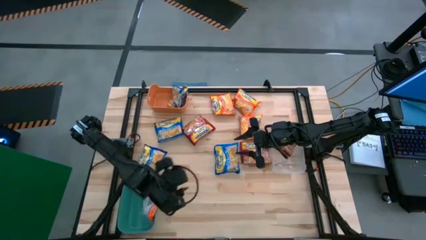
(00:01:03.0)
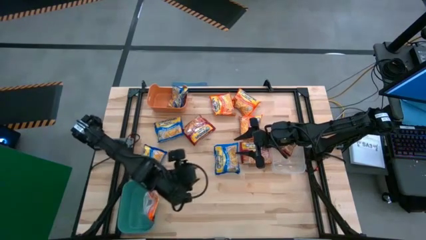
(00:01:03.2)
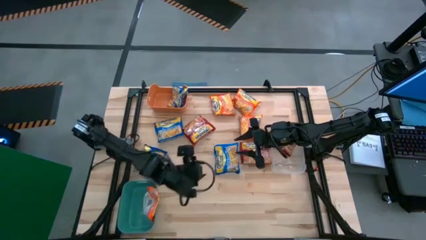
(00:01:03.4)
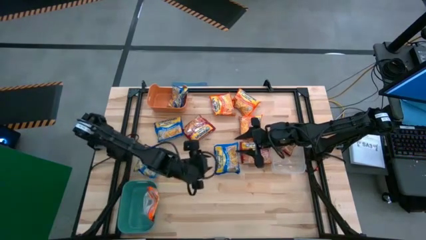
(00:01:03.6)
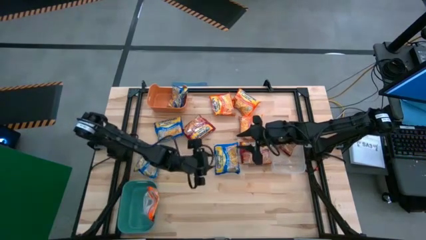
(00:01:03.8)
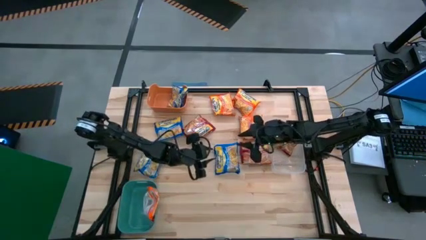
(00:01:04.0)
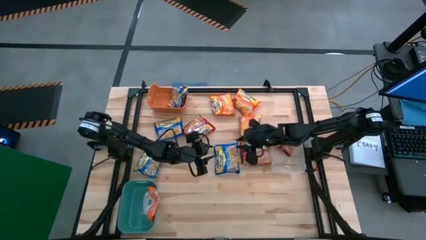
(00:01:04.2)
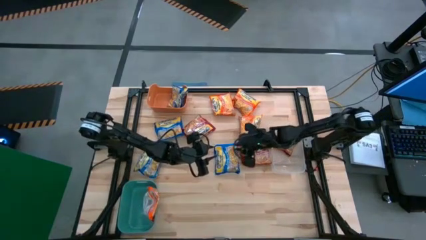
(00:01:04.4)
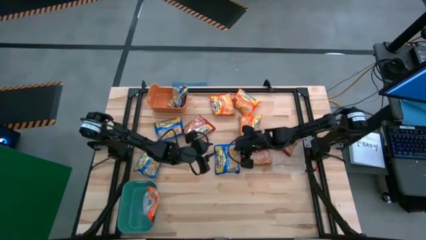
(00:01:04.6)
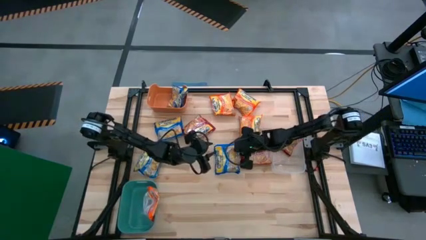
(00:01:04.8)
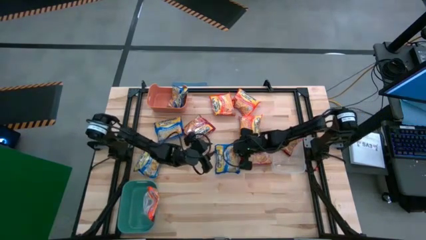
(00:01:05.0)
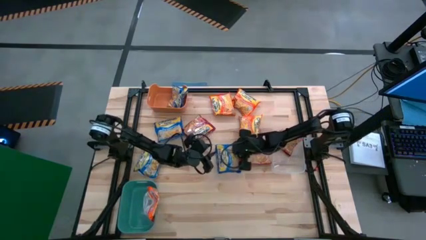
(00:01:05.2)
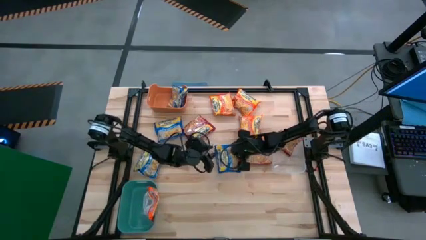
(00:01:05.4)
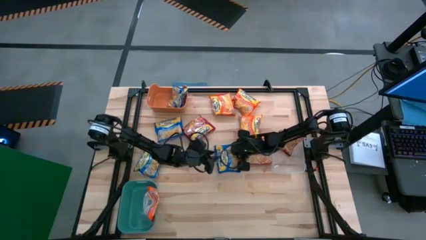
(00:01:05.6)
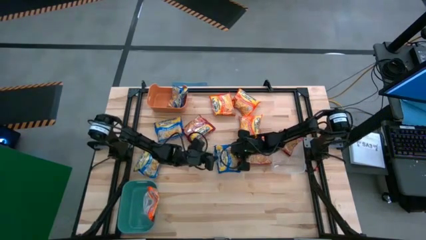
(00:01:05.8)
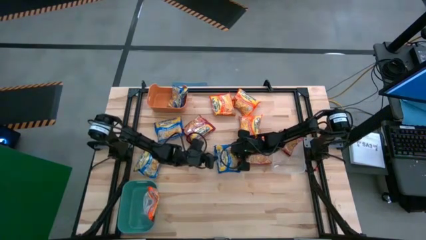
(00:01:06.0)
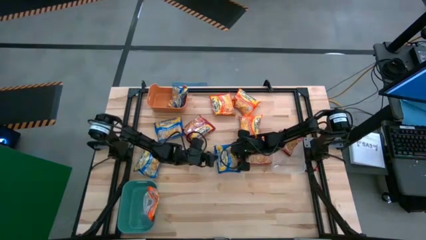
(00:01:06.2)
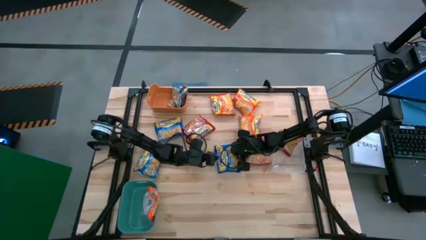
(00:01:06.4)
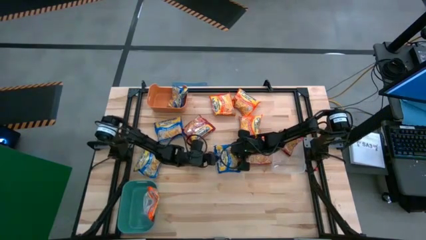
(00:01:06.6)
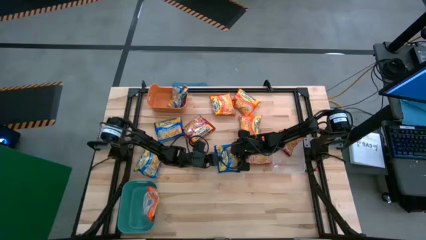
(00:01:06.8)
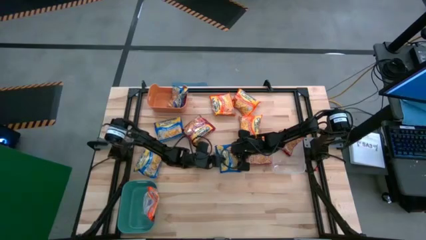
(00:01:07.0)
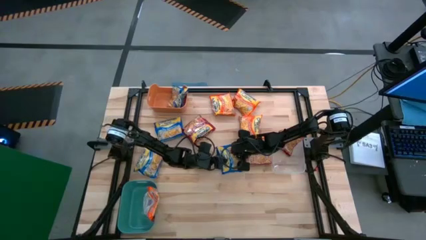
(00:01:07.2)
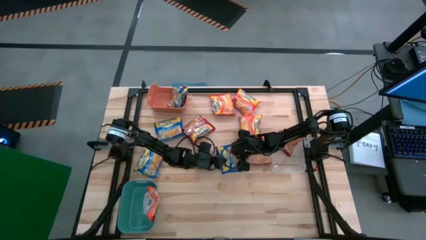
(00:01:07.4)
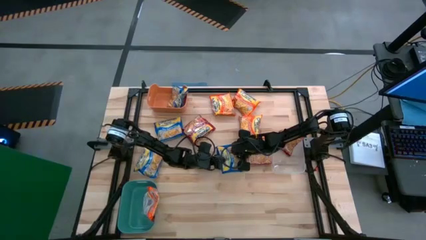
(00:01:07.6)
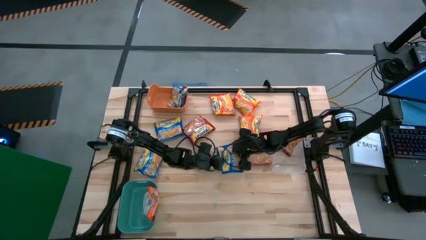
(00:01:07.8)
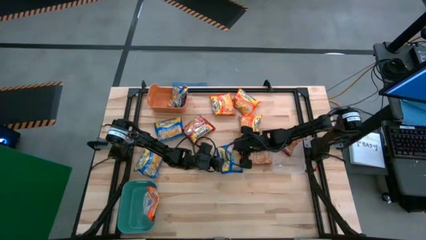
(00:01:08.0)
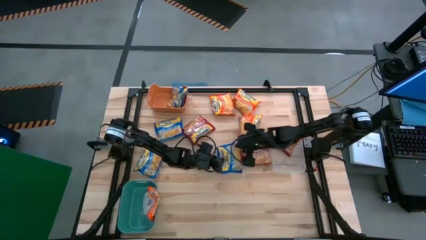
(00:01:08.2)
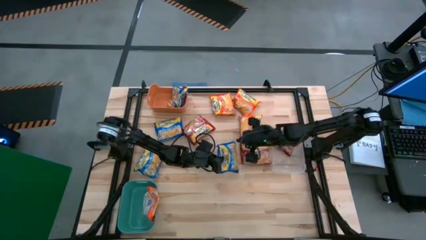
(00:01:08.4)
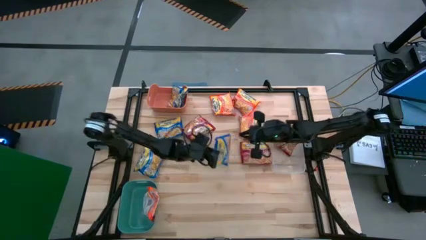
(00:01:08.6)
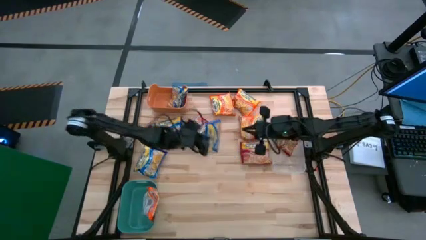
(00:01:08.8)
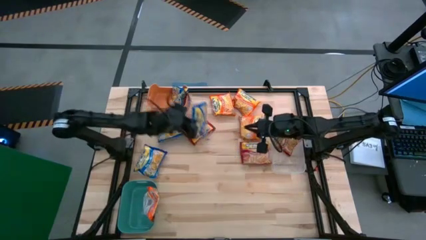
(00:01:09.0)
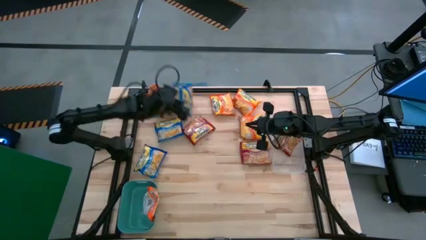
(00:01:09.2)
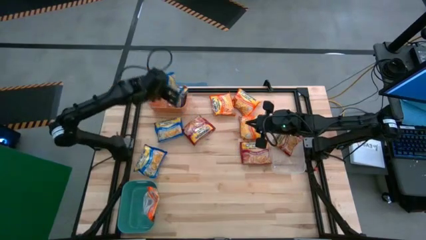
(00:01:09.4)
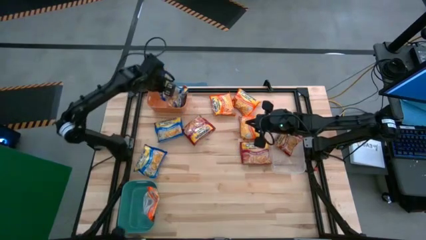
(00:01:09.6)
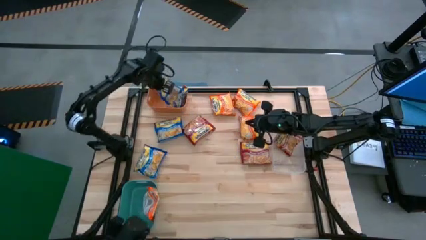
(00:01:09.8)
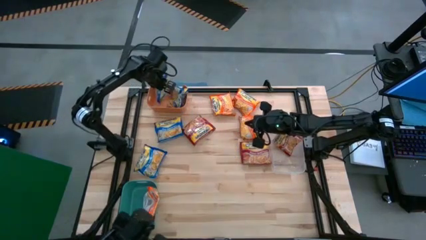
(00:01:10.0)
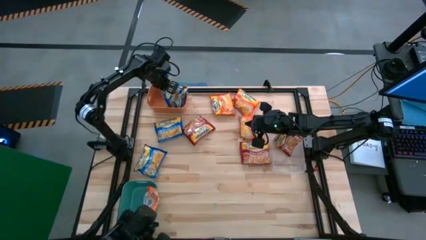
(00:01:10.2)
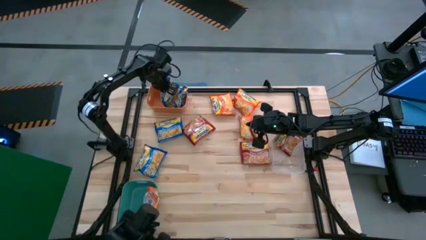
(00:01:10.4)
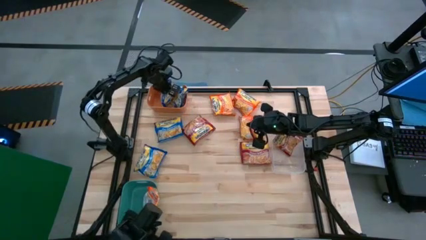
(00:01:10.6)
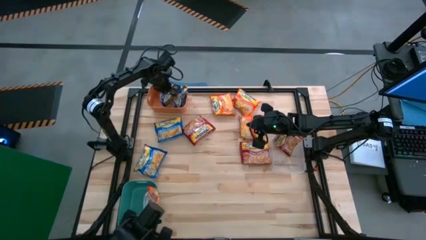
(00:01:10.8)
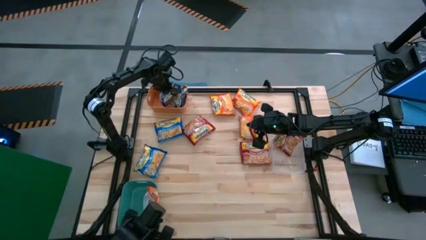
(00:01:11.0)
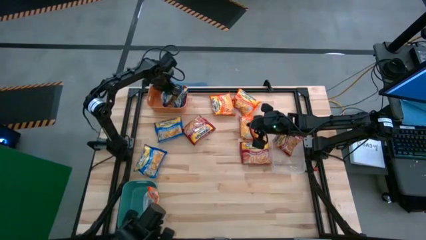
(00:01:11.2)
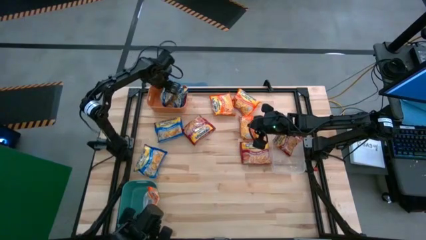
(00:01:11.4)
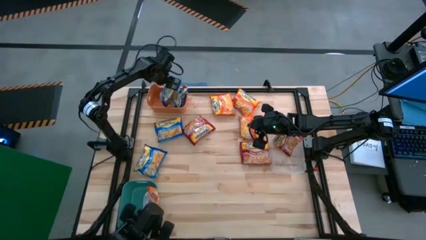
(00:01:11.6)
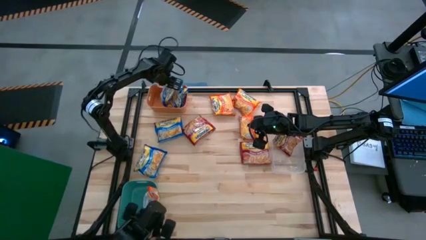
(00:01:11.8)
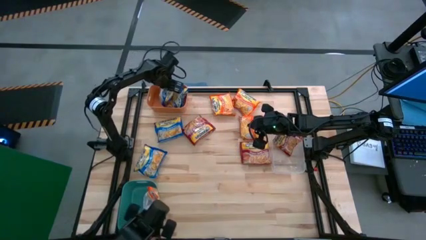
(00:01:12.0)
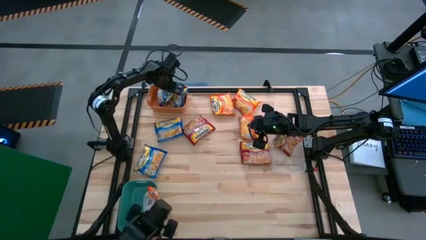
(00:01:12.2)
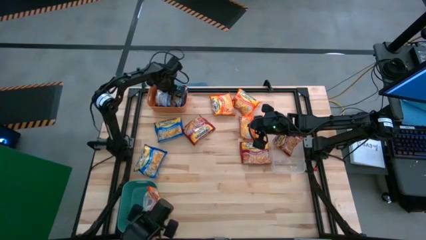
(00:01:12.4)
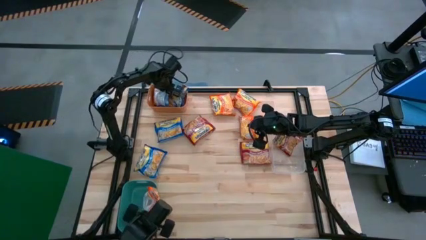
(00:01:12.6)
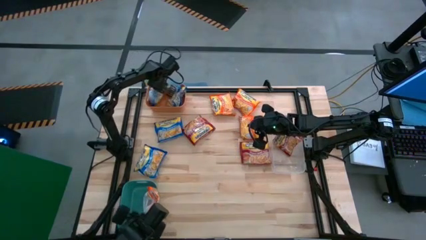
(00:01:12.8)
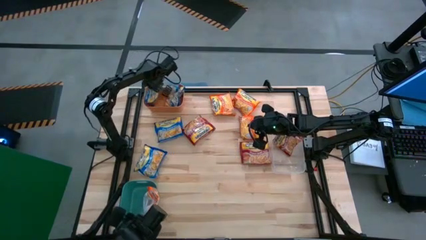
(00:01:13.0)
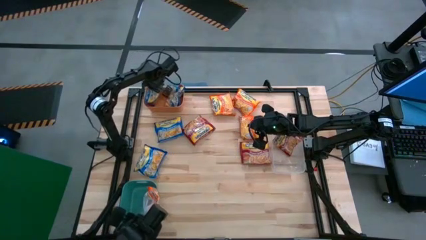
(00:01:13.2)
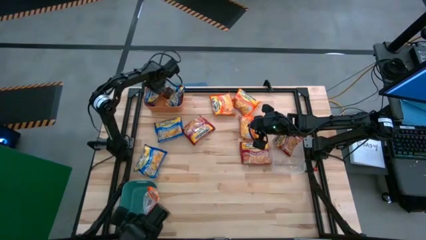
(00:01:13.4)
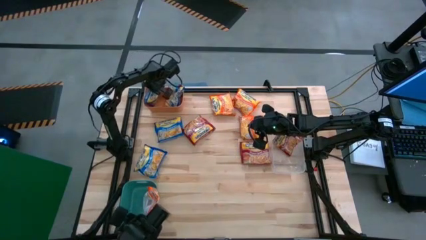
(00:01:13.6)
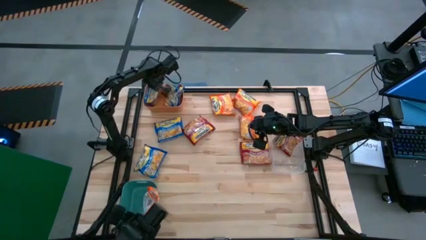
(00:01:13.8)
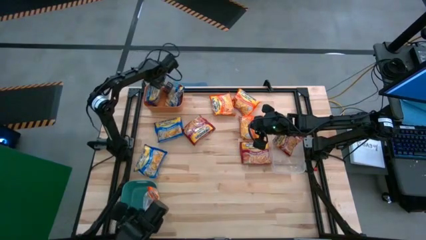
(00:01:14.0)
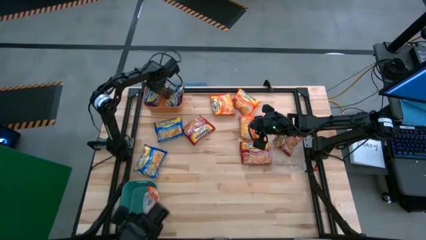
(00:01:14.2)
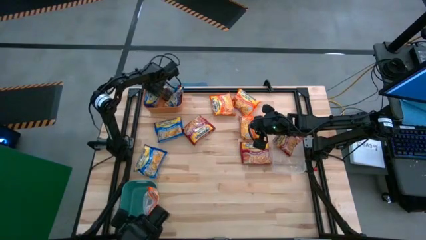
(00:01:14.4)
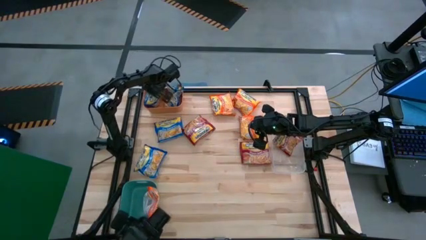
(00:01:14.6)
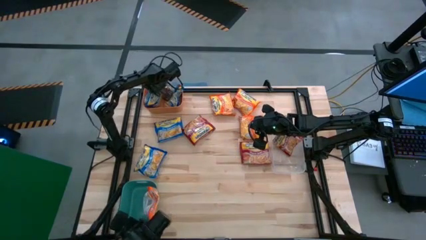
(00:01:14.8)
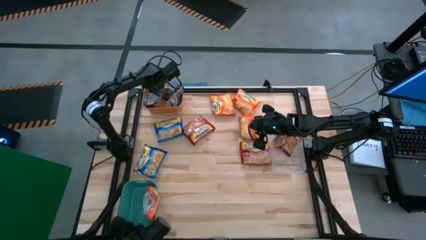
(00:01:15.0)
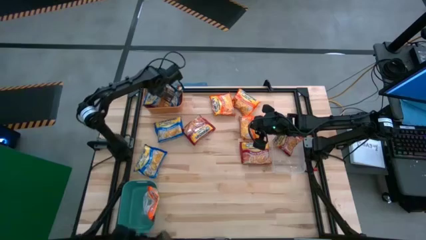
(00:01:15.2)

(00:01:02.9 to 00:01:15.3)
Task: Sort Maruchan noodles
Put the blue noodle pack into the orange bin

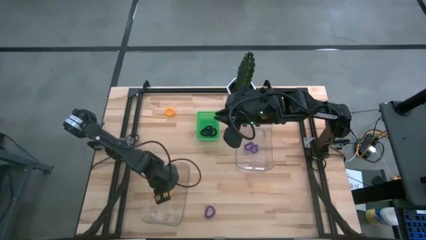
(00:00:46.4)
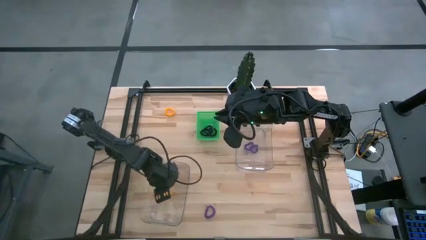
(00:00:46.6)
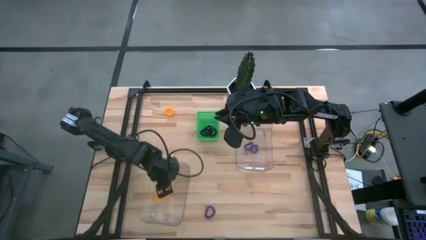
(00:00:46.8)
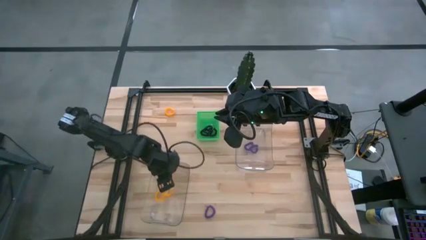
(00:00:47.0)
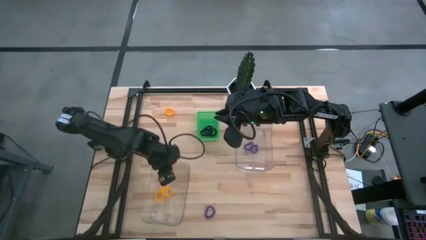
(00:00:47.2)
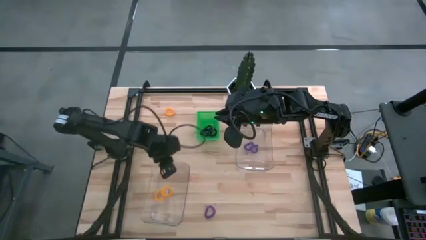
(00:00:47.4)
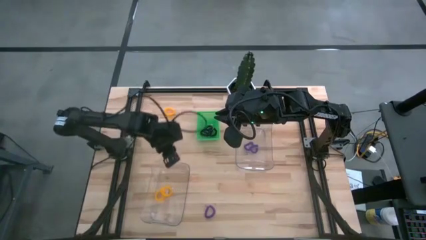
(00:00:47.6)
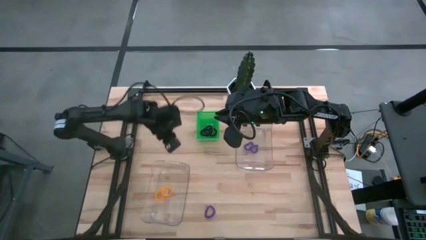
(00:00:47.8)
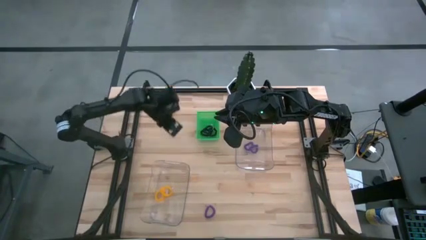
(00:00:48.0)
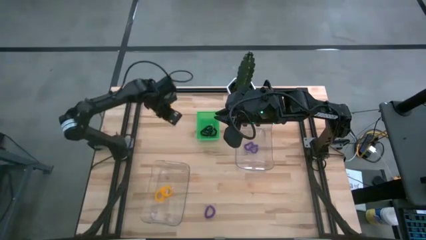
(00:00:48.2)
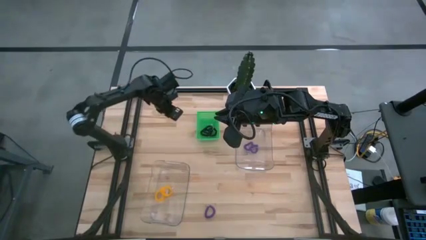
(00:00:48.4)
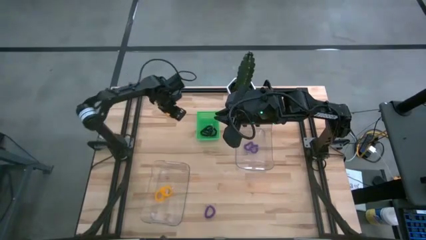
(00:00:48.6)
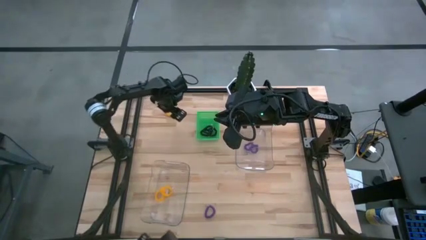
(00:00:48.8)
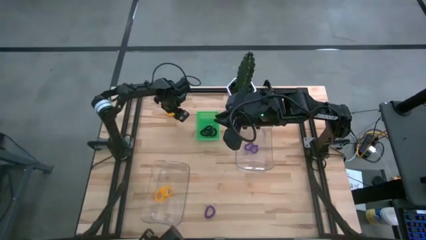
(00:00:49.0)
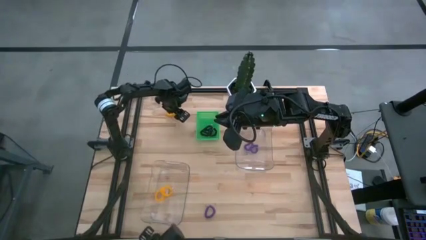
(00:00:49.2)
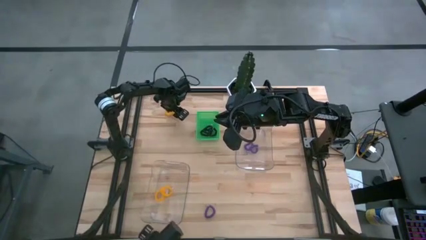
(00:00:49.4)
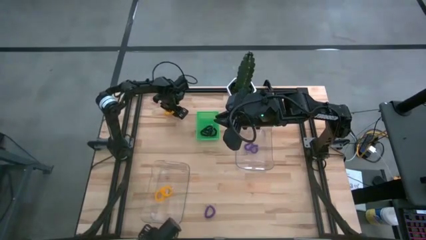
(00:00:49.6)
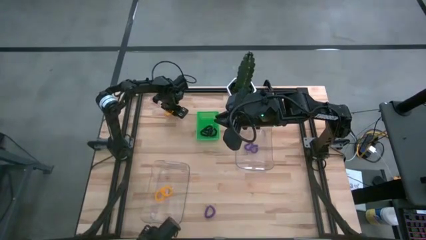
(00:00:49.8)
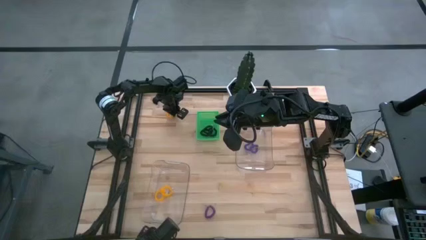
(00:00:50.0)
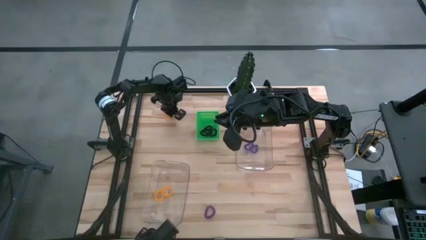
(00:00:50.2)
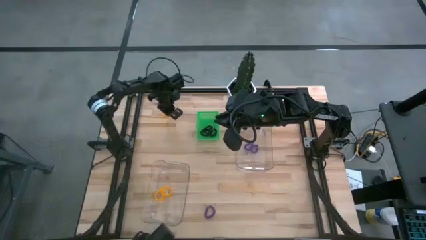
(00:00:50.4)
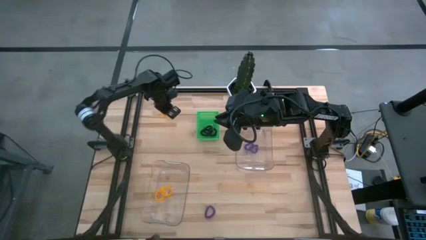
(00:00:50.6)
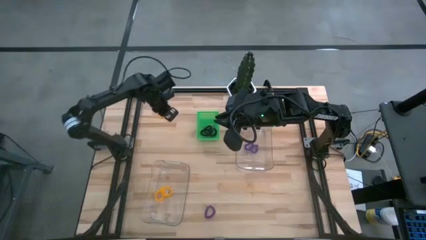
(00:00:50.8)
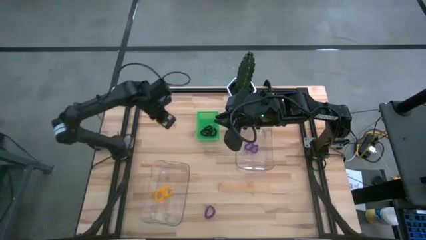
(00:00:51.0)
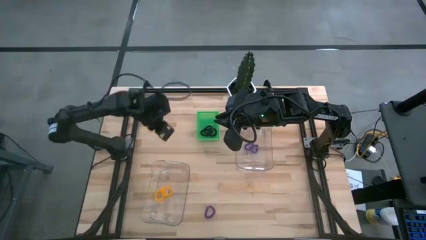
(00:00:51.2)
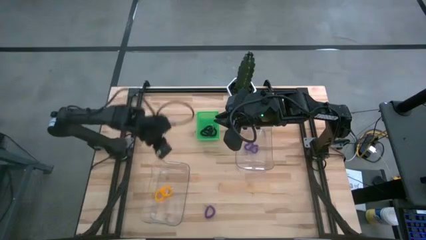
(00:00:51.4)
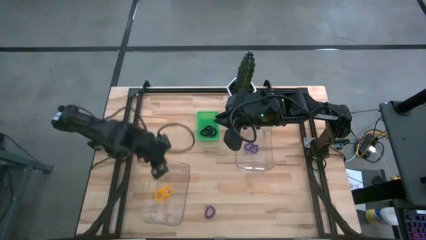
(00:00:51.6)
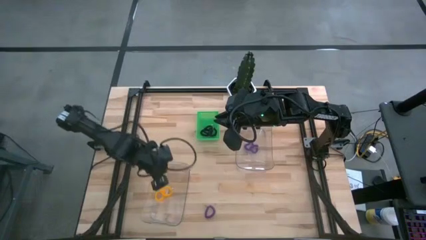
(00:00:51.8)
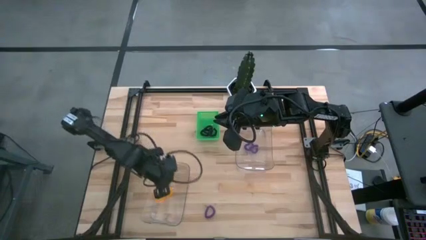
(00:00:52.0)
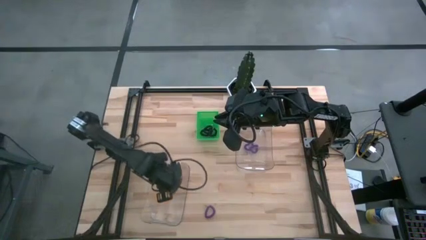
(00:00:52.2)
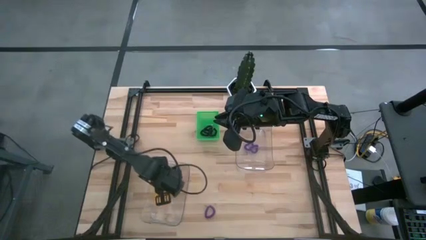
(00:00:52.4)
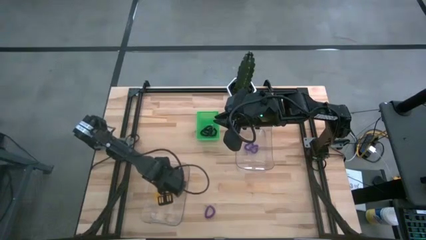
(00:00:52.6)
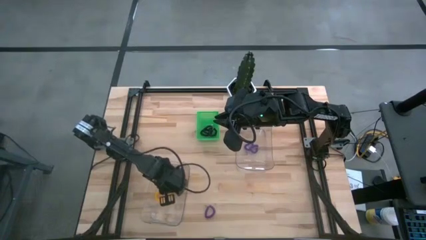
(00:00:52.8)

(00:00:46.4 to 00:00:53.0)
Task: Sort spring keychains
Put the yellow spring keychain into the bottom transparent bin
